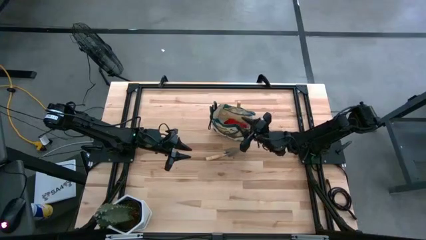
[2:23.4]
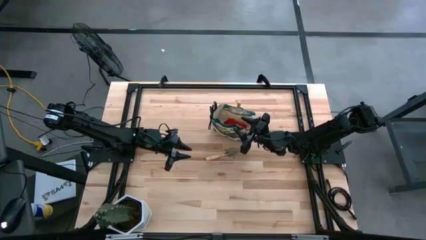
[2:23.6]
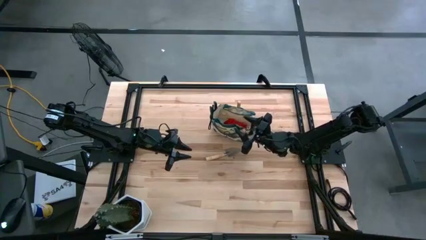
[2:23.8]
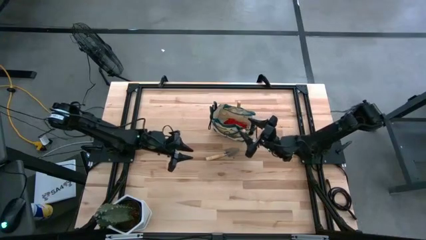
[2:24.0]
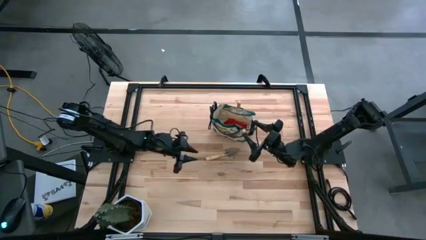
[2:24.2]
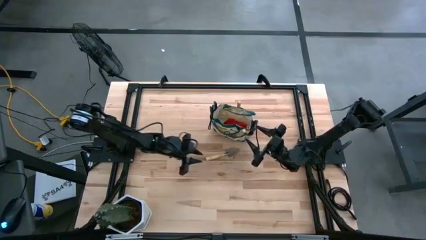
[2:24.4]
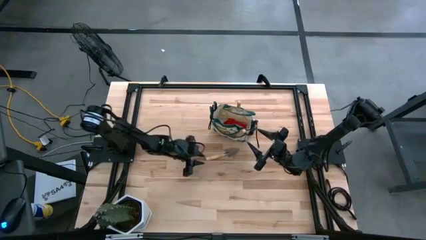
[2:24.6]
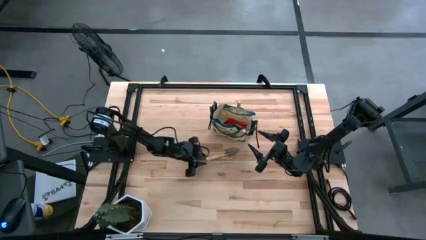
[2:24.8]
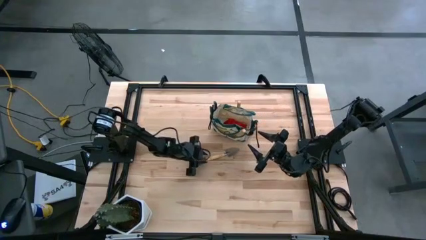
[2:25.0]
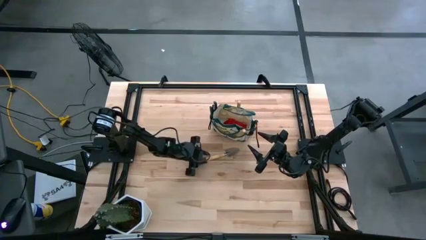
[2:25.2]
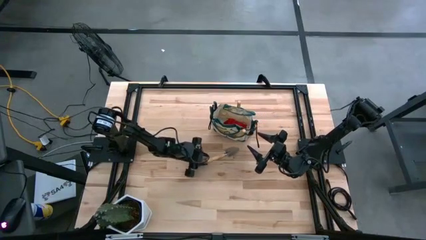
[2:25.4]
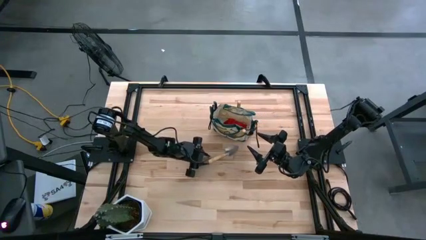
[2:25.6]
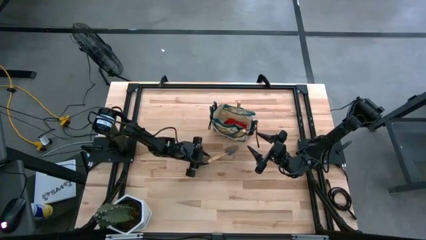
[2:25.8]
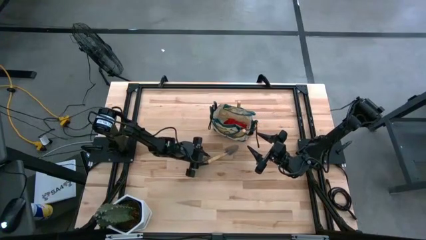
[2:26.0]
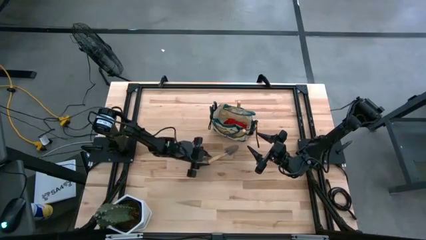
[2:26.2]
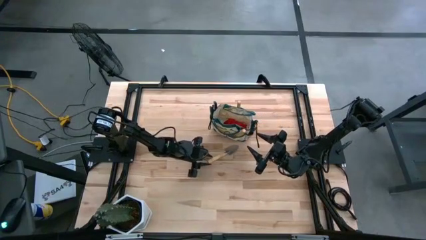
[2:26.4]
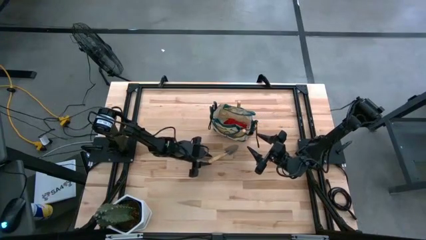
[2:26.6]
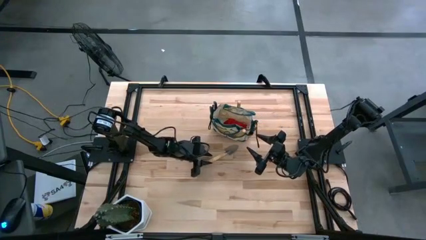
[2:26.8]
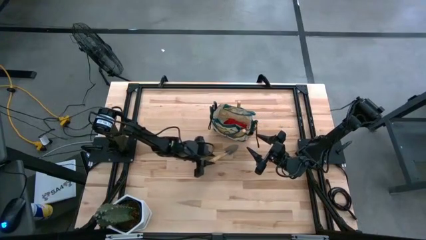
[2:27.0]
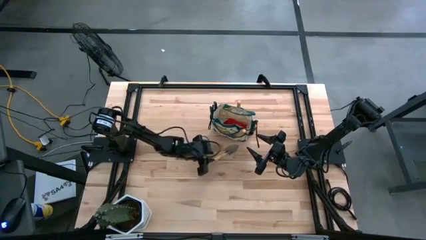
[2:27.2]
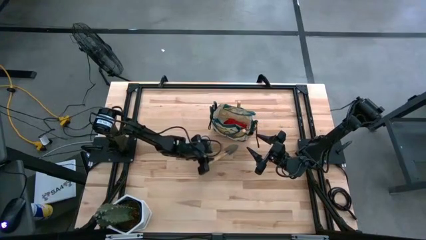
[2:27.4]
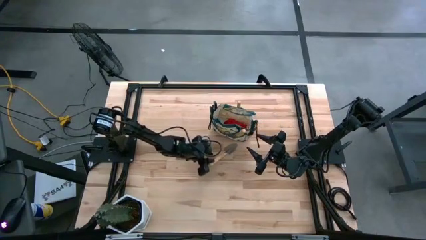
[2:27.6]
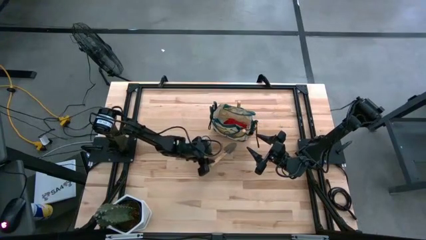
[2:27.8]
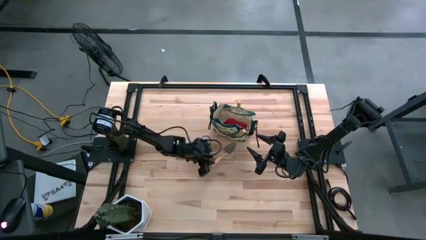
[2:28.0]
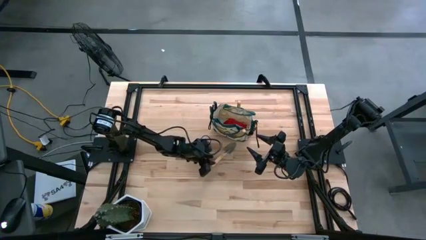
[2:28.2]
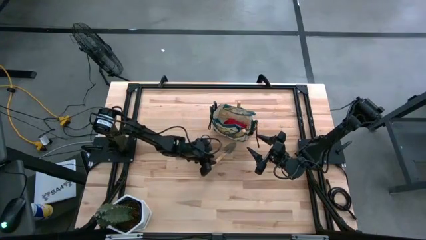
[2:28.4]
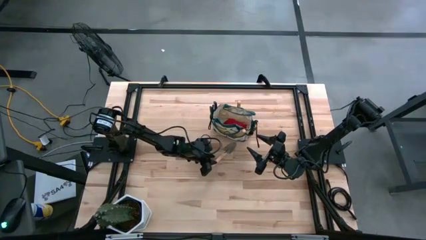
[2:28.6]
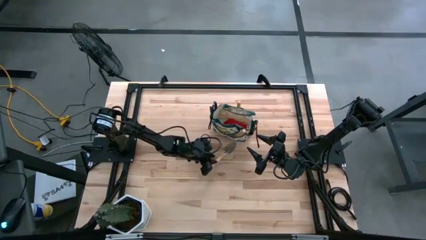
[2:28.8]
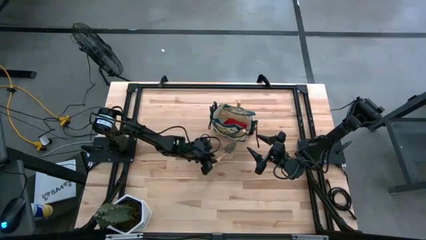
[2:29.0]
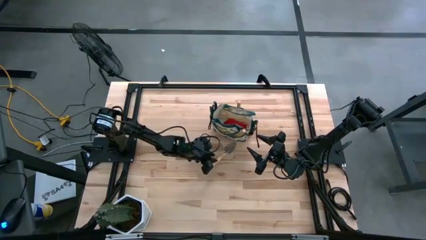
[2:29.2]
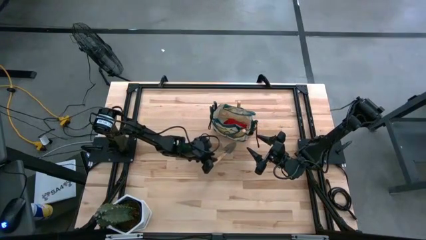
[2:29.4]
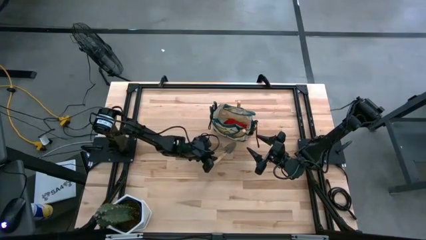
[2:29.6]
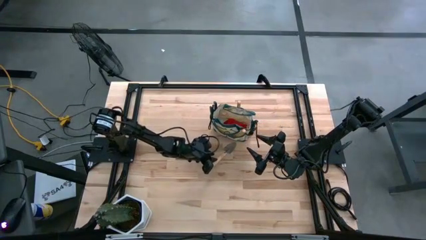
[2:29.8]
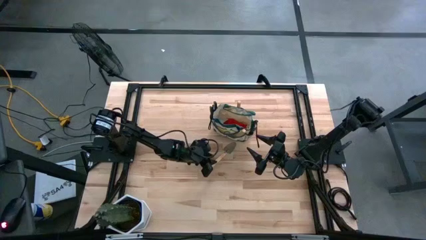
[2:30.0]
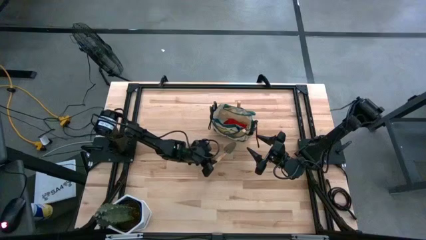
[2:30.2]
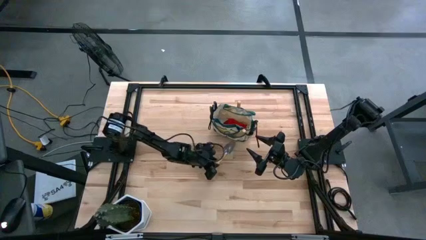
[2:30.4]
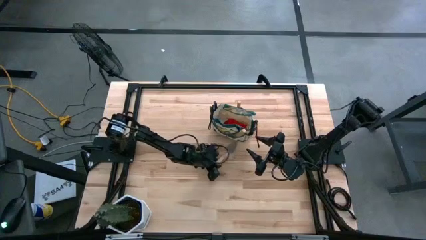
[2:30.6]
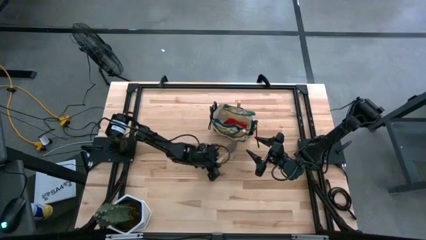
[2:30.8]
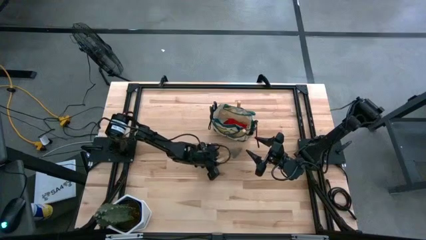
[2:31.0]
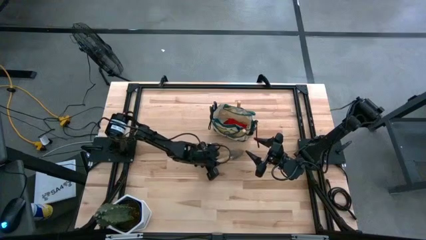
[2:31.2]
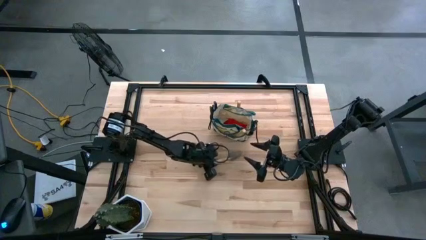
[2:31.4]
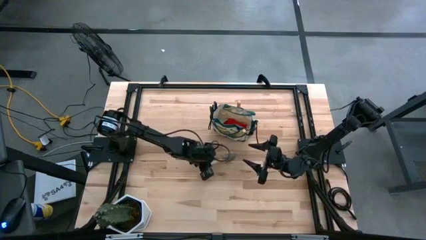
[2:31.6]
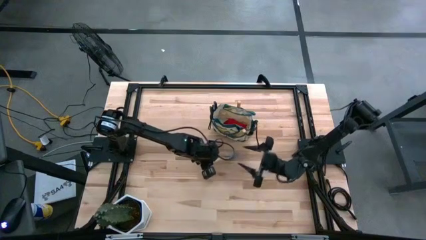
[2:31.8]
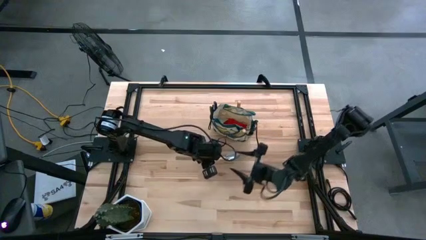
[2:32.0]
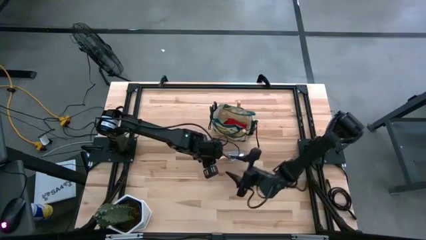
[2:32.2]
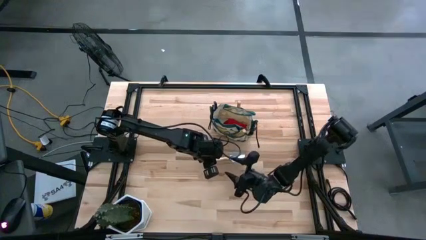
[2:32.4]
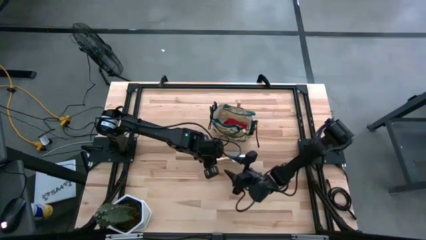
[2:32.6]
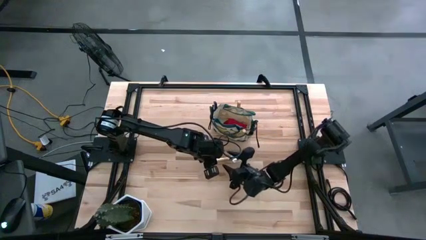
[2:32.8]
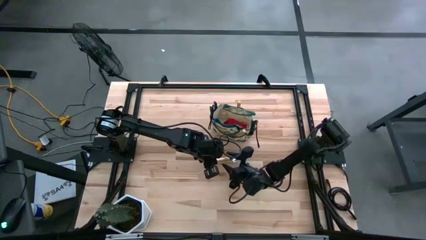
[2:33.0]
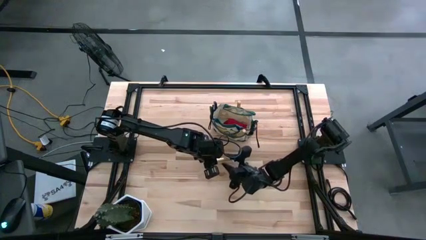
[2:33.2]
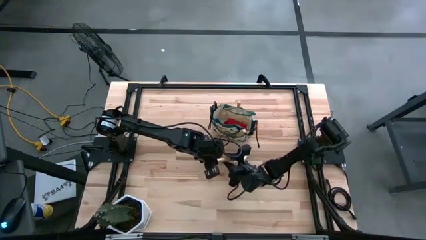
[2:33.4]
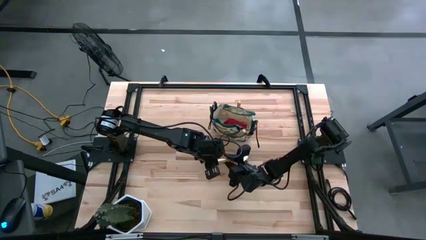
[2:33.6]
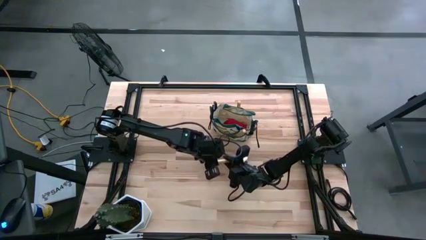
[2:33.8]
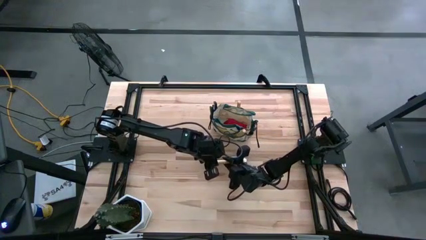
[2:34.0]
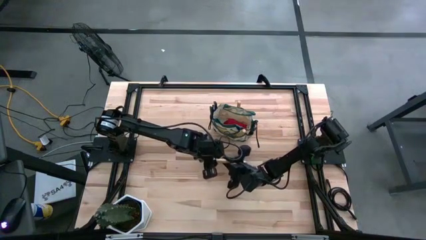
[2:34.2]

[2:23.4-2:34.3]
Task: Pick & Place Garden tools in Gardening bag
Put the brown trowel into the gardening bag

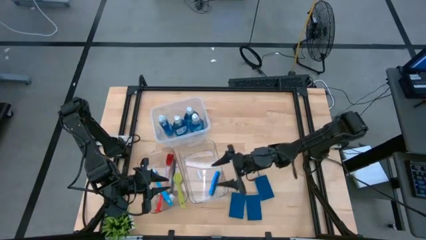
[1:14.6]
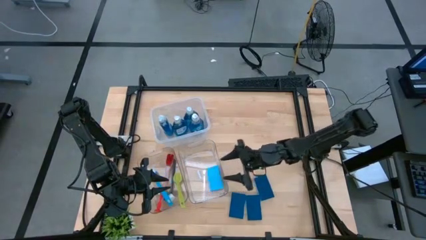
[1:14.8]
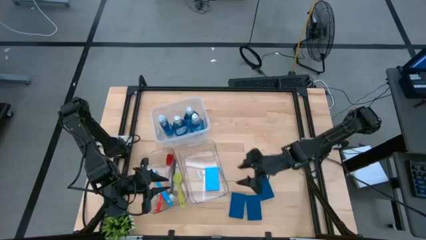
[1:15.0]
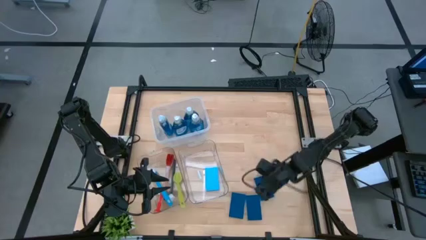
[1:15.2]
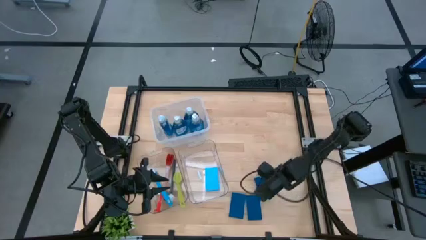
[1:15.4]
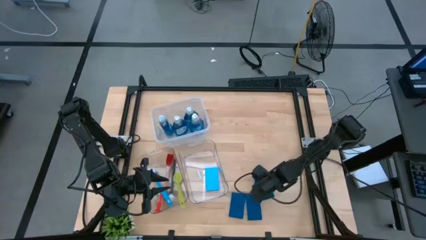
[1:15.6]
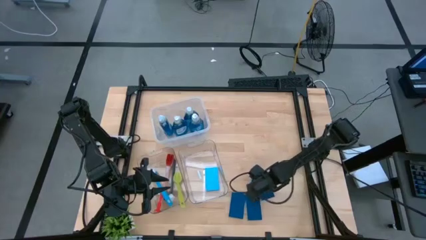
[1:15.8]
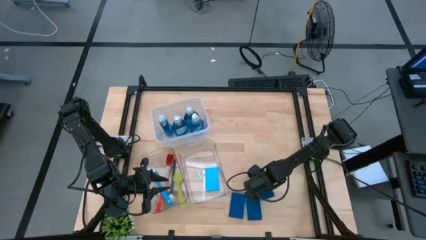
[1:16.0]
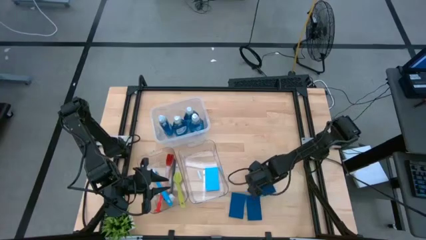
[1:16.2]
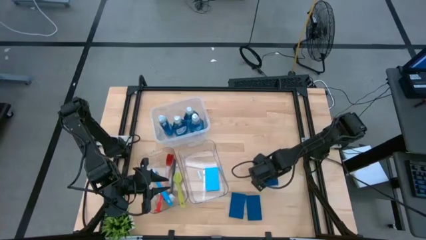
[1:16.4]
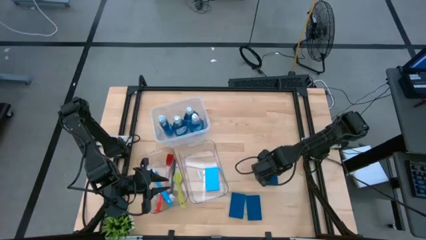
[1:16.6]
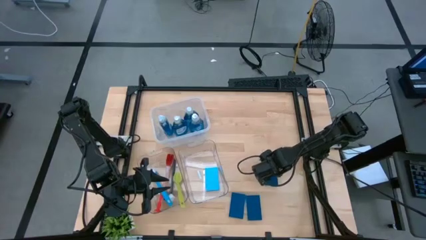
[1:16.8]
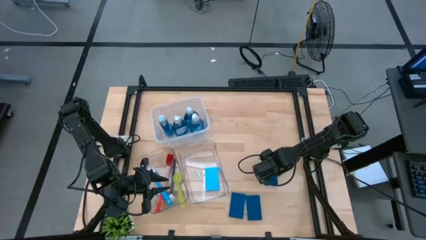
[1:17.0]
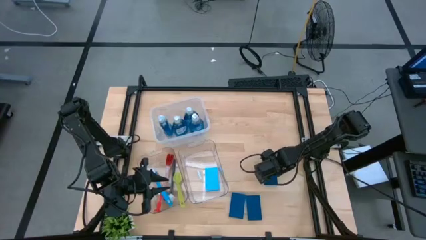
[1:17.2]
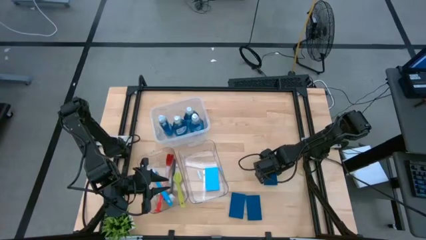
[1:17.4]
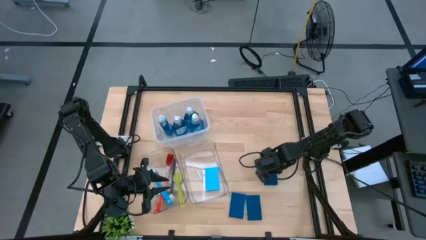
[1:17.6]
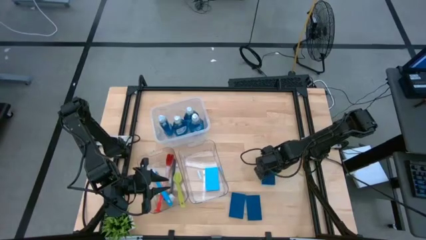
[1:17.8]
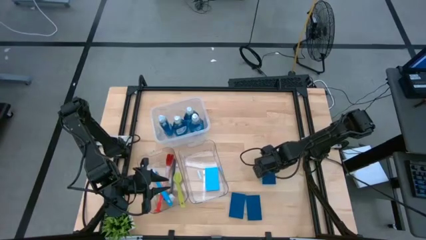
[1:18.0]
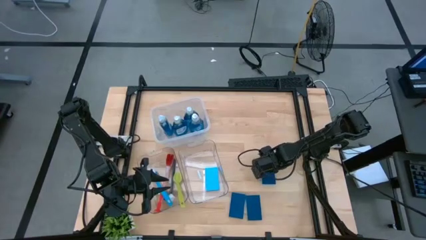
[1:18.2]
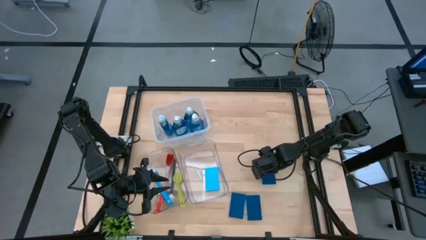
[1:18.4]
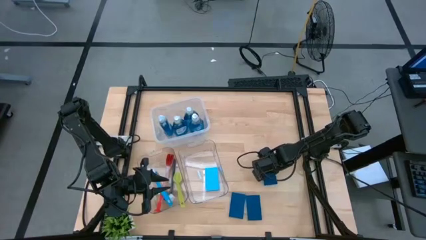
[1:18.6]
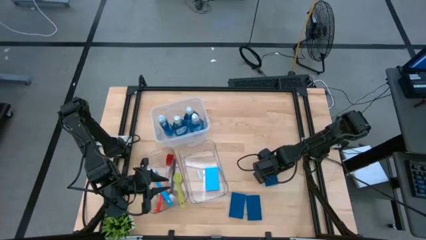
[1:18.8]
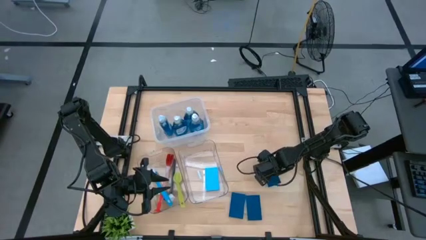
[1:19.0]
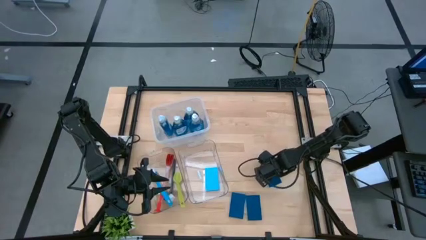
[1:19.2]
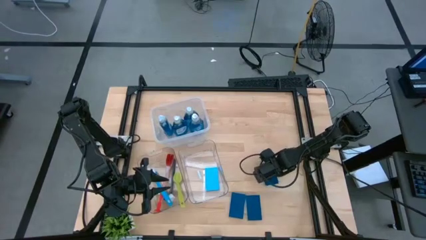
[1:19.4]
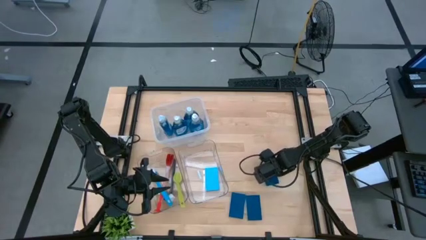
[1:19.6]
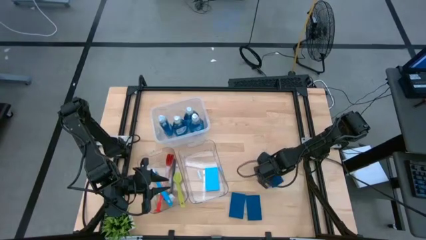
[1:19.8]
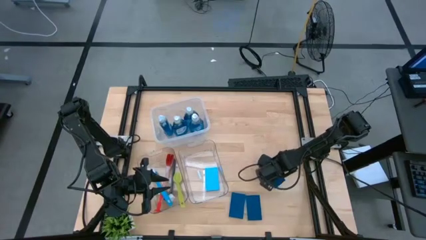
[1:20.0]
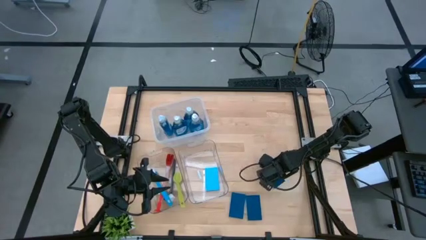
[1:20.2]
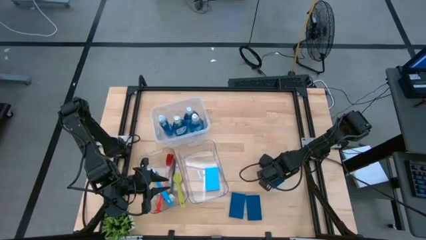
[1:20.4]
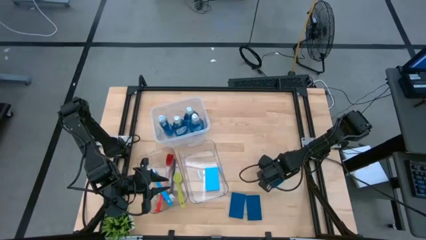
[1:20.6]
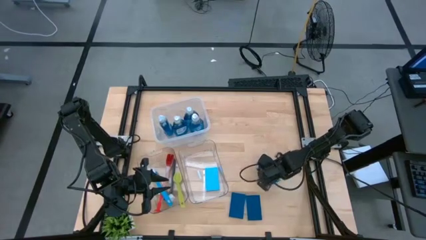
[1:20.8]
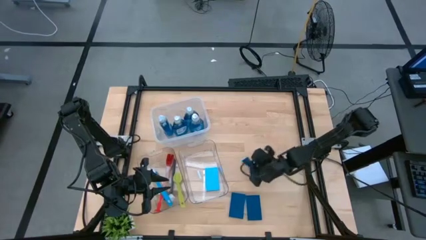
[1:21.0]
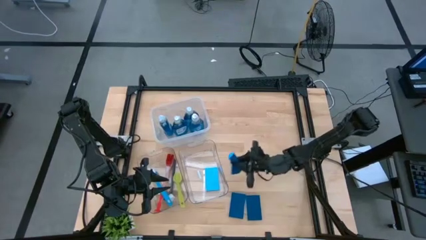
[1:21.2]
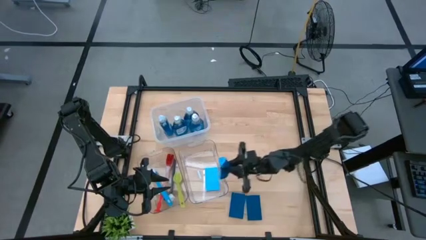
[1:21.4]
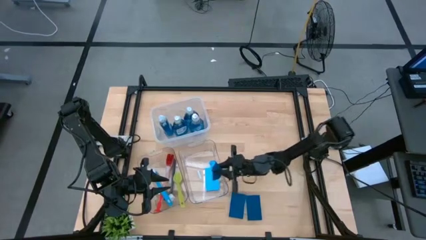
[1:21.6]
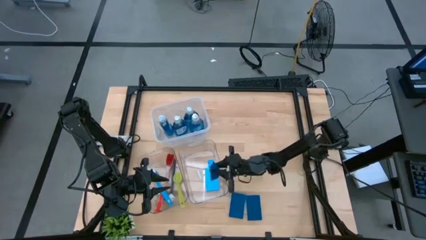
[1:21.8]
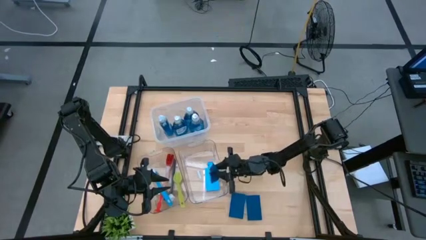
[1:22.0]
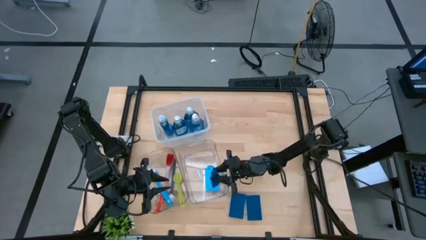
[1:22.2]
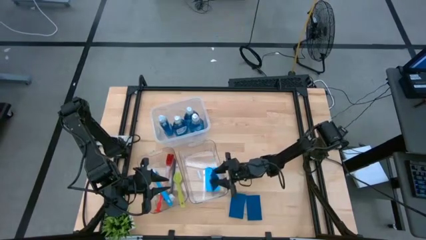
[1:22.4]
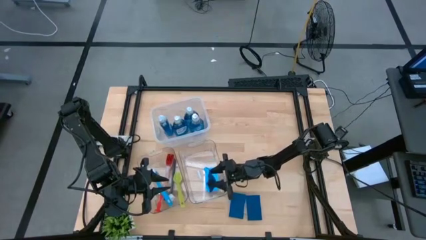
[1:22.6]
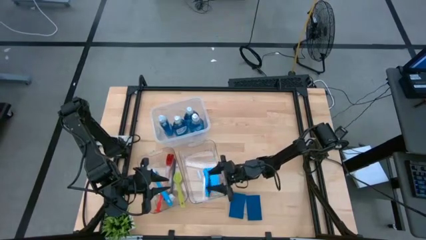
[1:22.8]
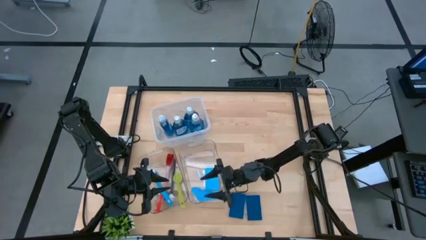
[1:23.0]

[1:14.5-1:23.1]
Task: Pick & Place Kitchen Sink Supplies
Put the blue sponge wipe into the right transparent bin
